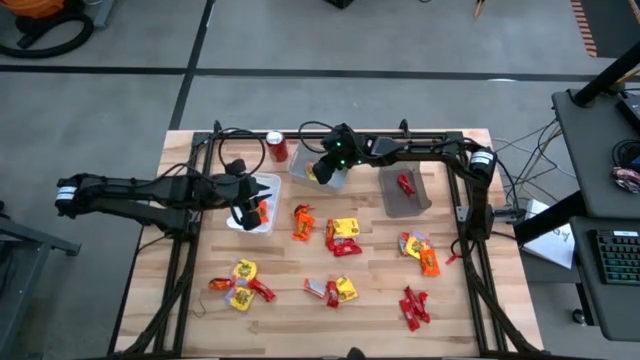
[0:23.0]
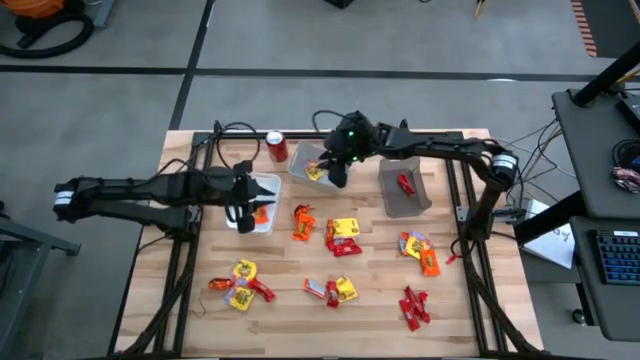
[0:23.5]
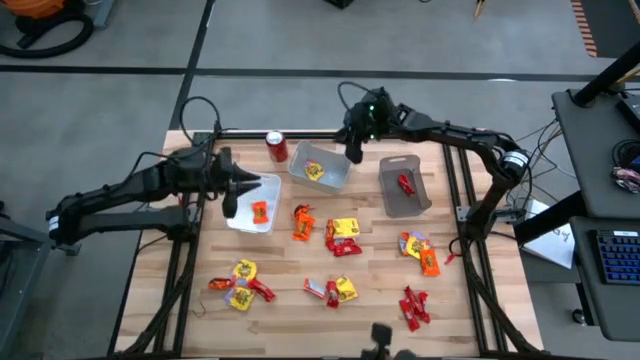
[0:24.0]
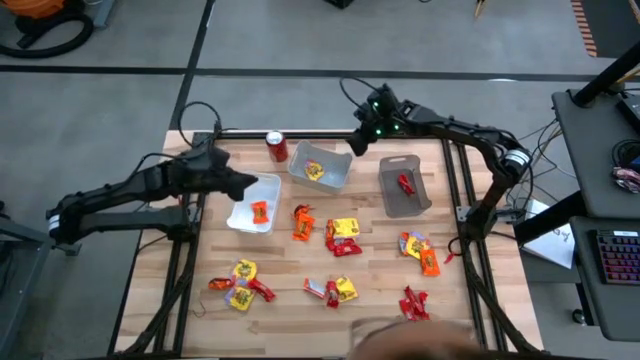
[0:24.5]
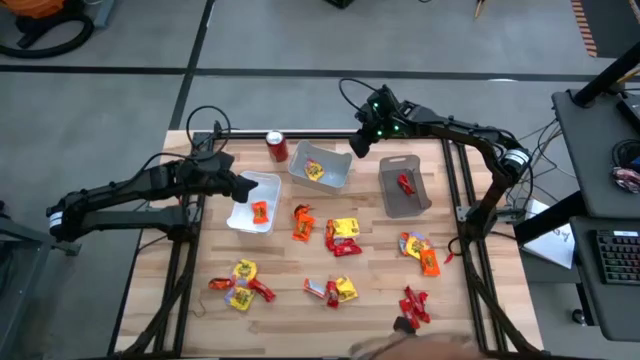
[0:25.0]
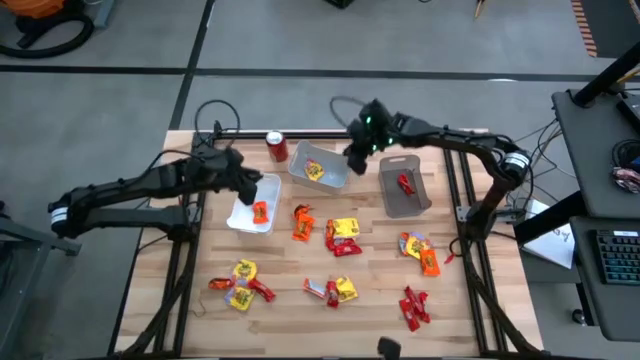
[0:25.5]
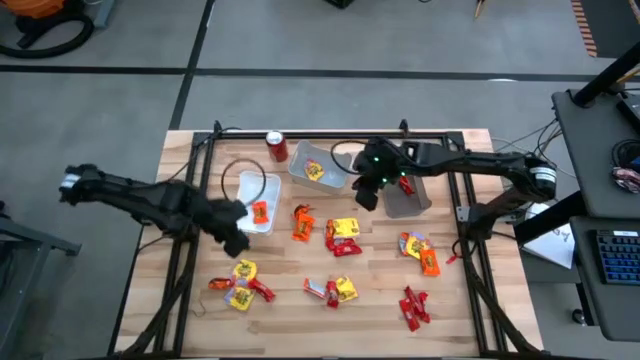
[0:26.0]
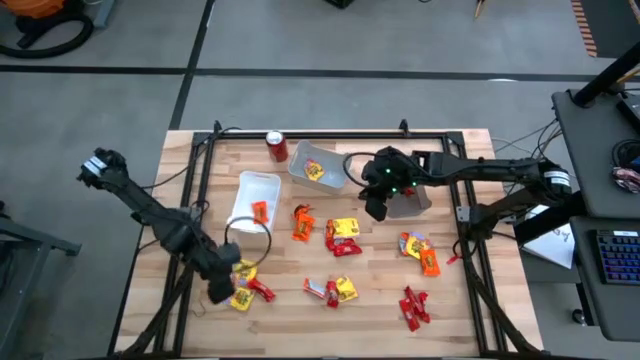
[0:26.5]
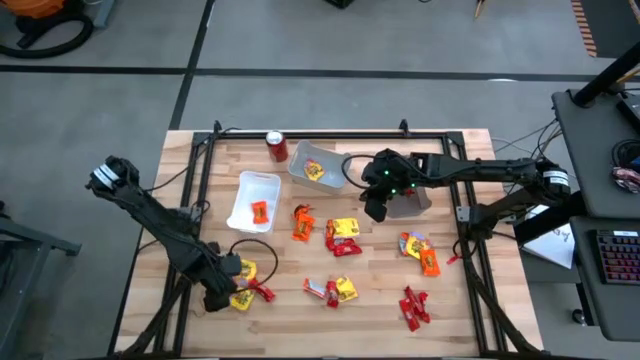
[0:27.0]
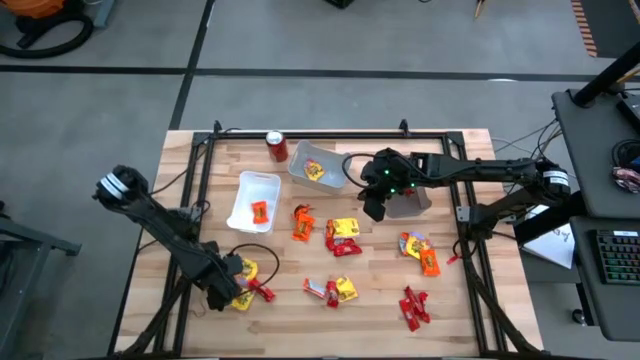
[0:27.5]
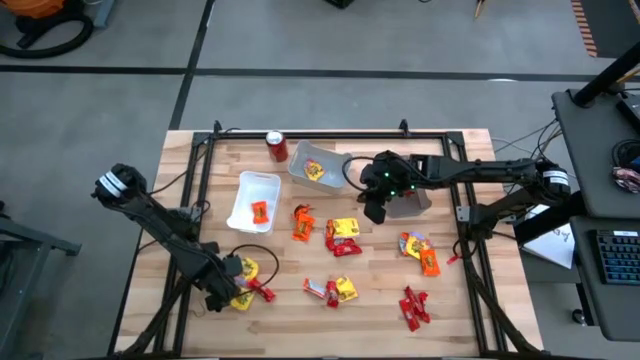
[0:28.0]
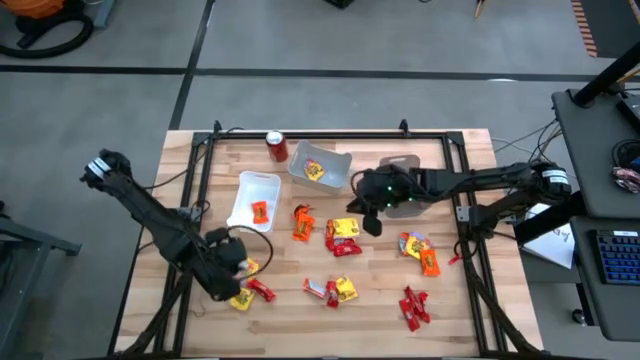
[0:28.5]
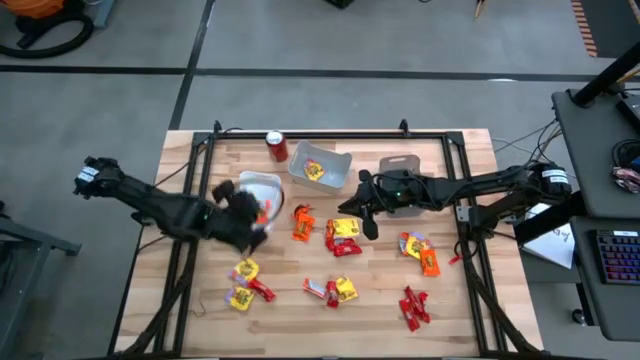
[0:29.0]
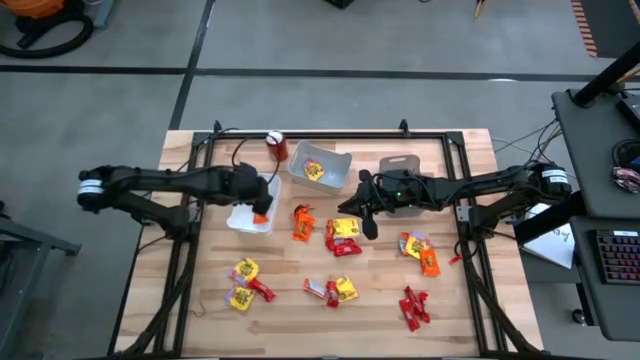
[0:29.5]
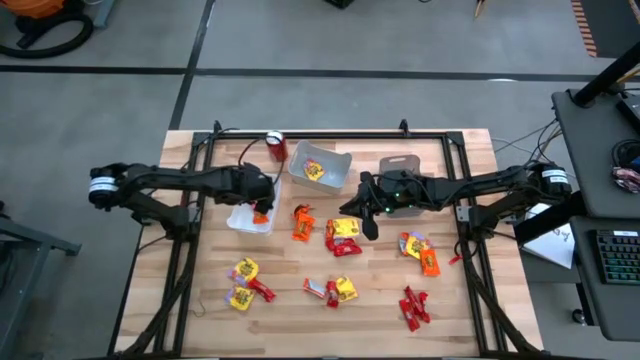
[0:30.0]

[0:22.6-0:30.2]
Task: Sort candy
Put the orange chocolate into the white bin

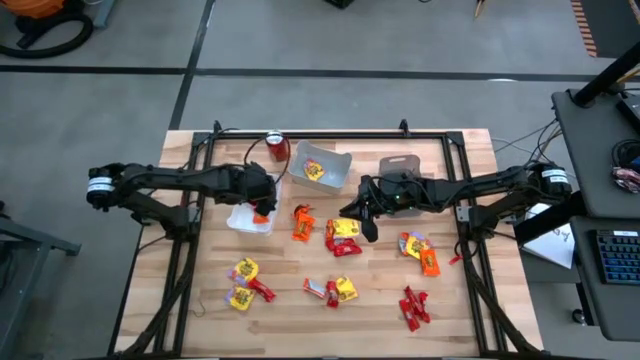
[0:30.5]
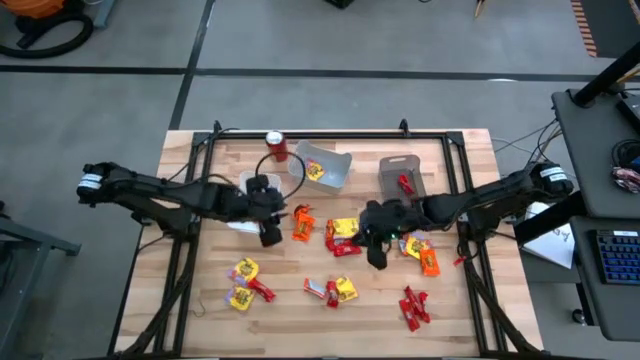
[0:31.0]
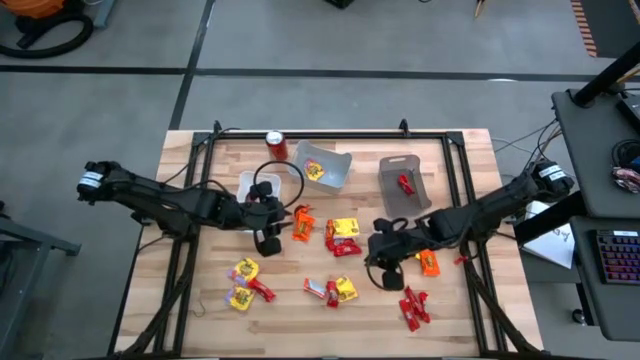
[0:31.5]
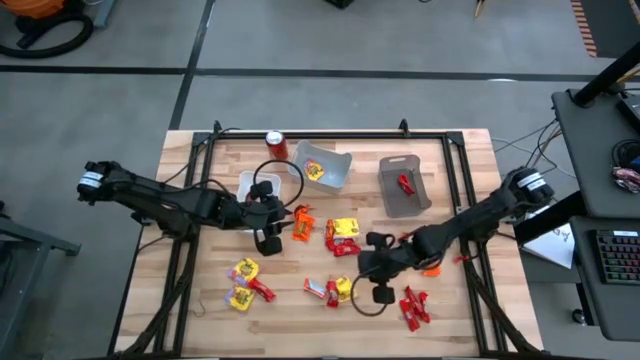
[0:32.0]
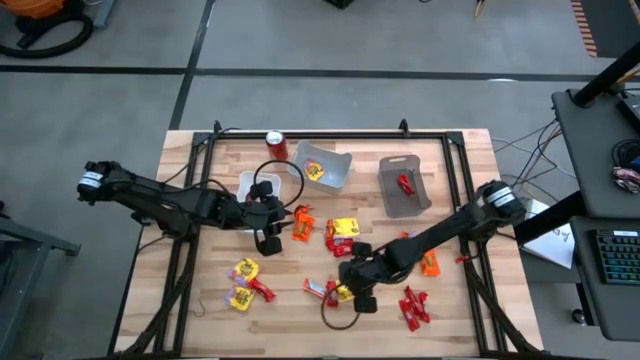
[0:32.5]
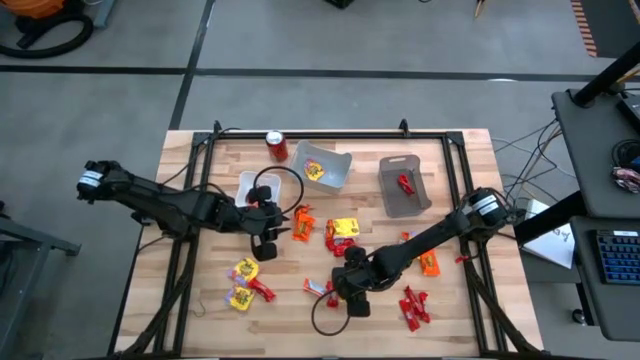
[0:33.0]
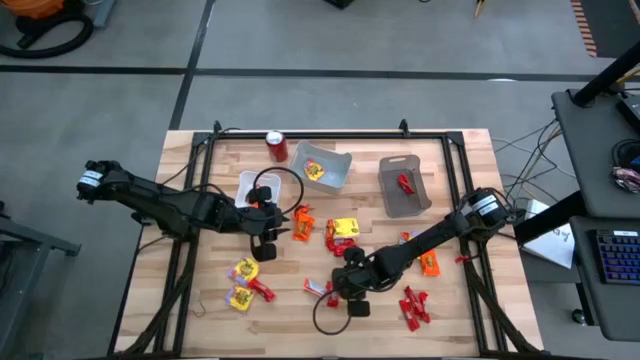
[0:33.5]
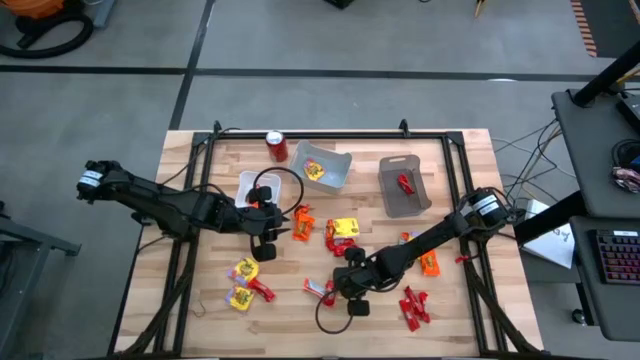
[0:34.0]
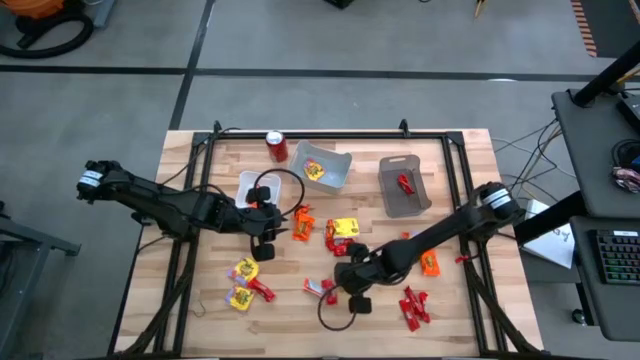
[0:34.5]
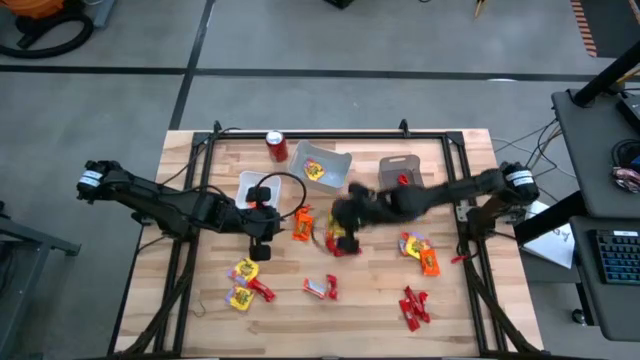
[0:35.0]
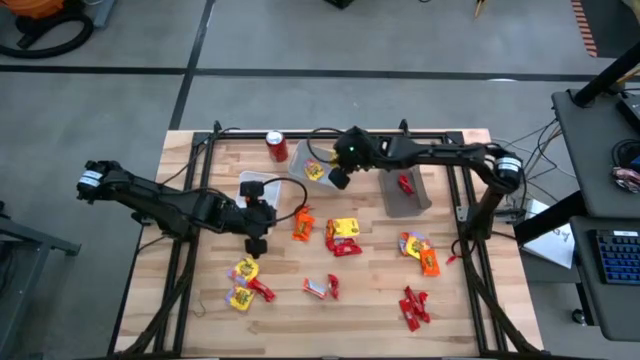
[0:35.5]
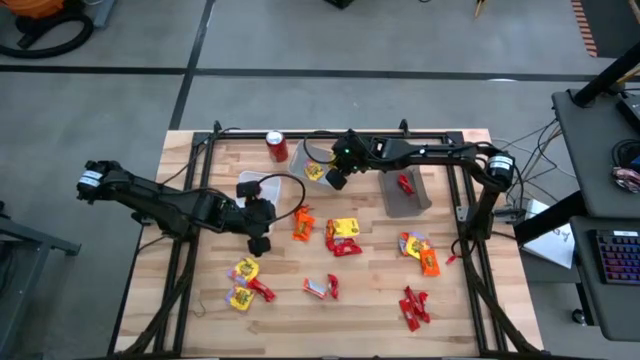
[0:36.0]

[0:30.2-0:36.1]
Put the yellow candy into the gray bin

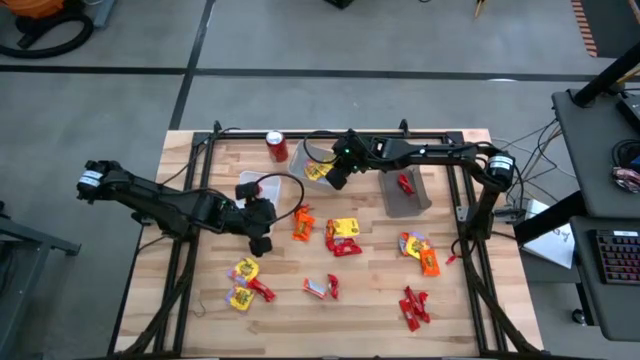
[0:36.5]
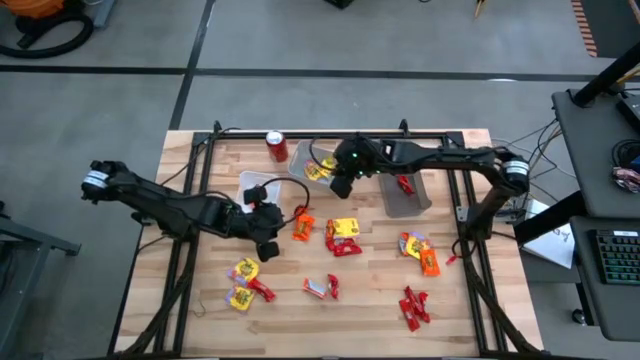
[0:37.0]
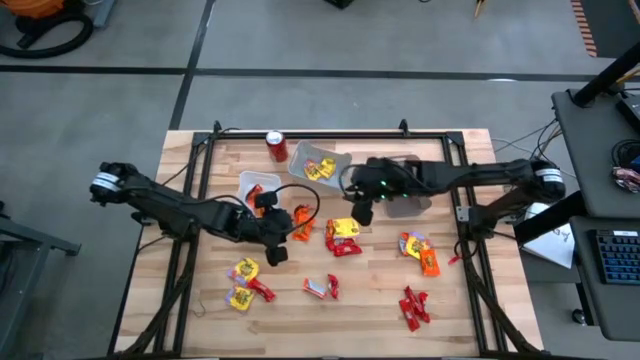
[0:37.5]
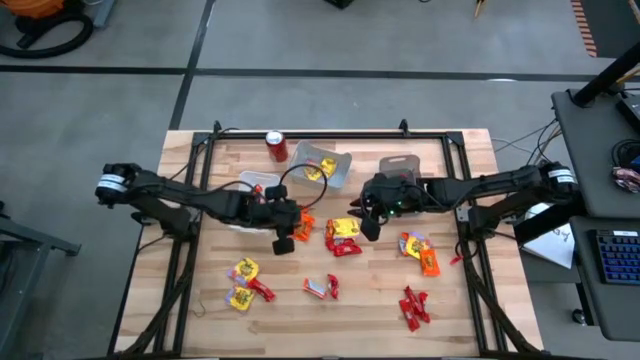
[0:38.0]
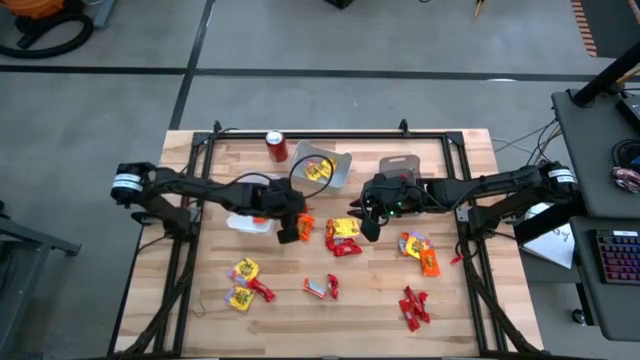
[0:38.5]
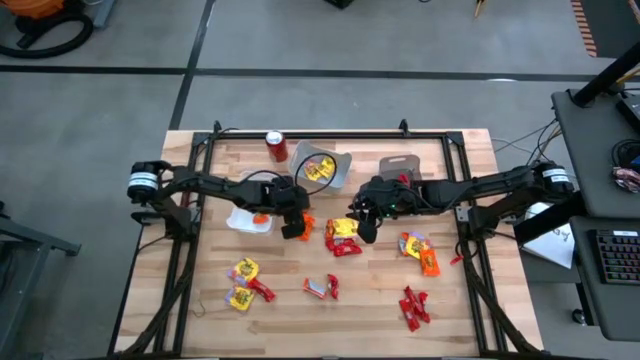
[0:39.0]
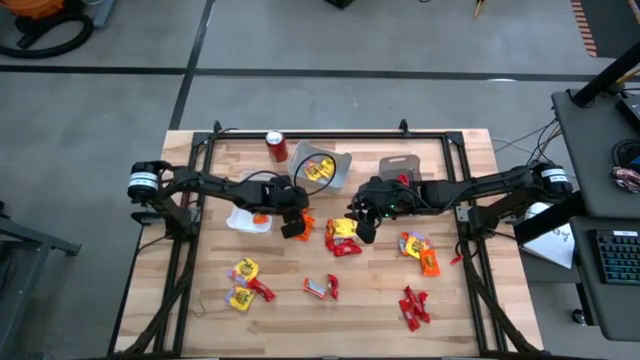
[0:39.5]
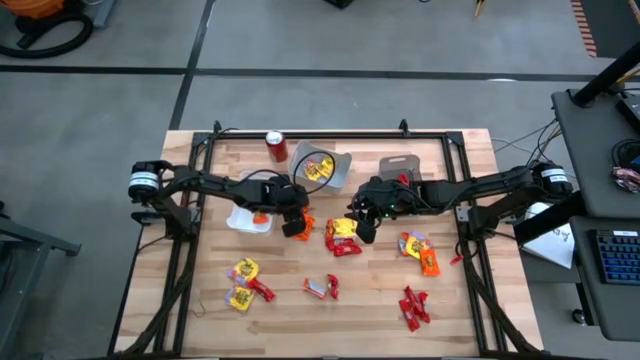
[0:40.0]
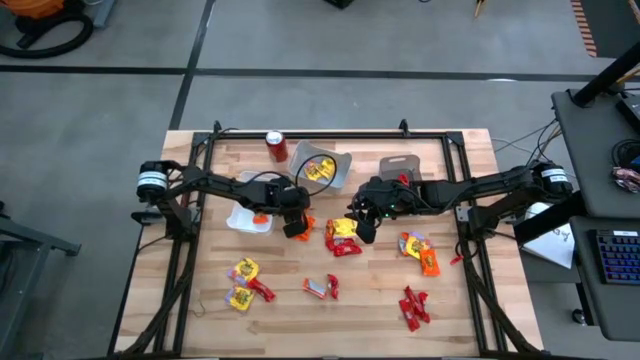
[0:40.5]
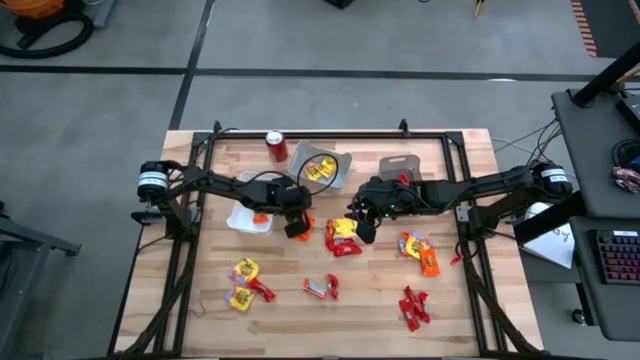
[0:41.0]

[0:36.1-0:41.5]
Put the orange chocolate into the white bin

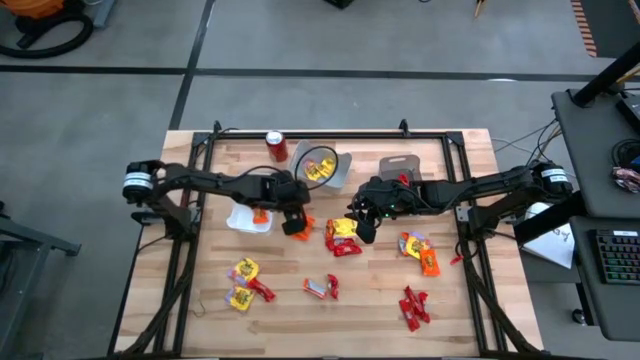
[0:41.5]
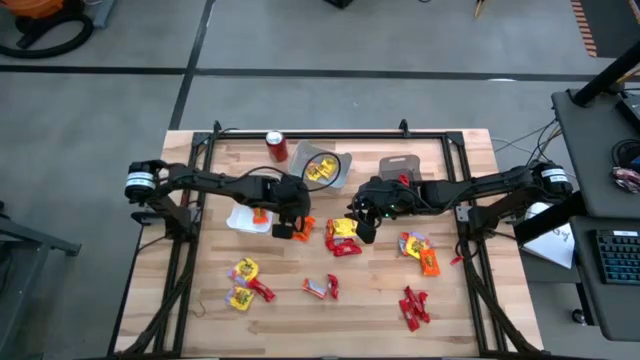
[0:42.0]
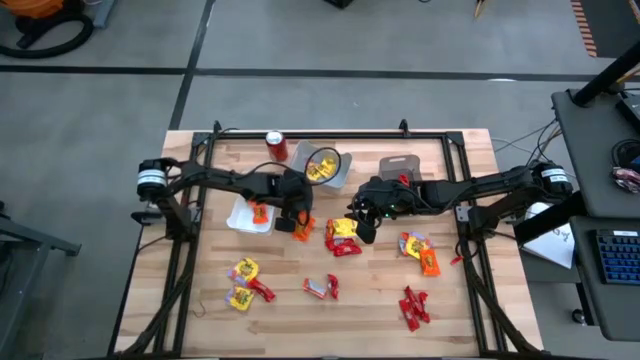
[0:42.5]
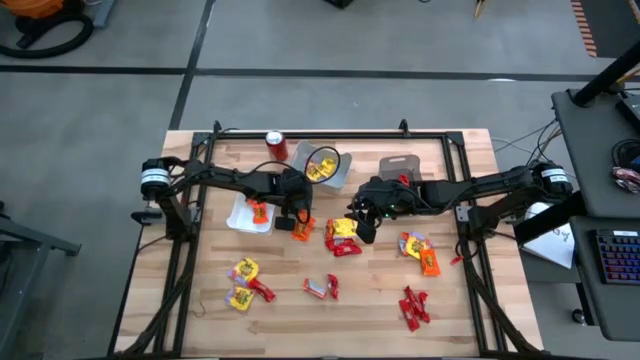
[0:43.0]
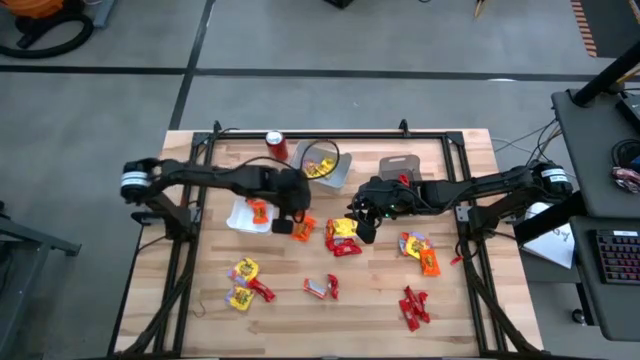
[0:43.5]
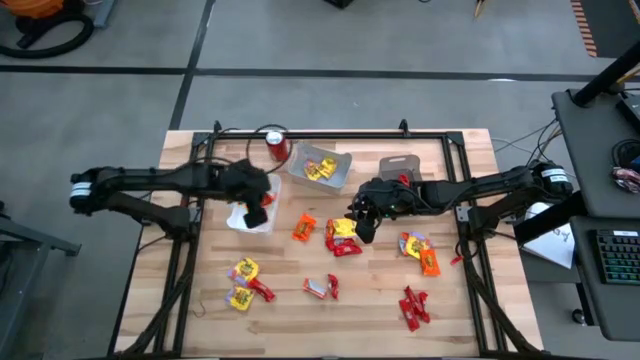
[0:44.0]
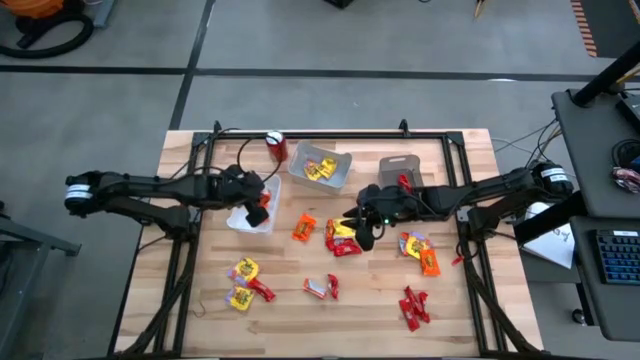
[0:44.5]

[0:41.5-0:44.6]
Put the orange chocolate into the white bin
